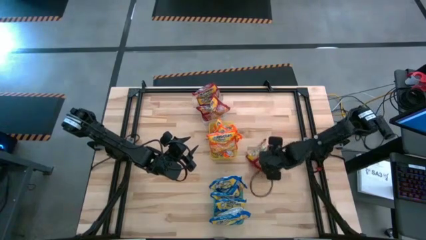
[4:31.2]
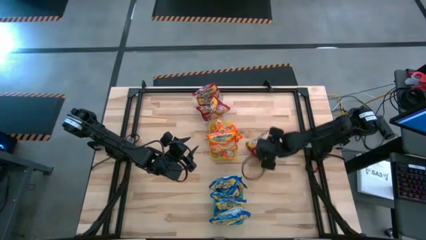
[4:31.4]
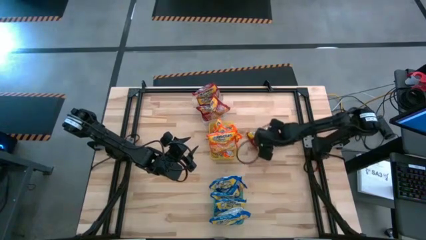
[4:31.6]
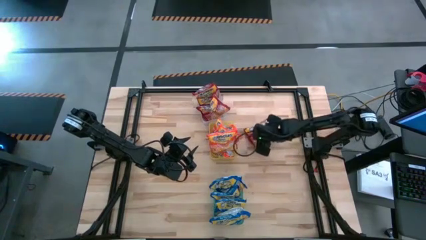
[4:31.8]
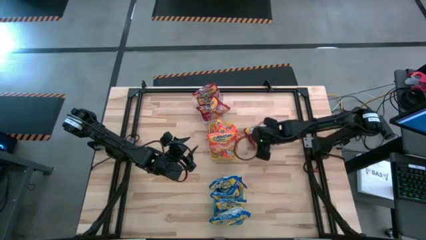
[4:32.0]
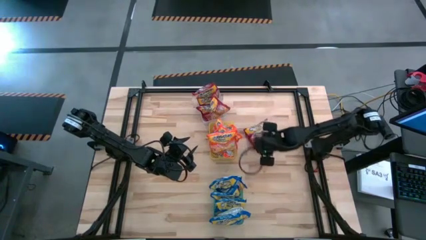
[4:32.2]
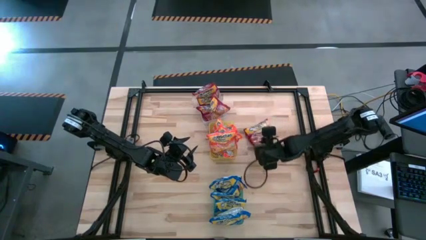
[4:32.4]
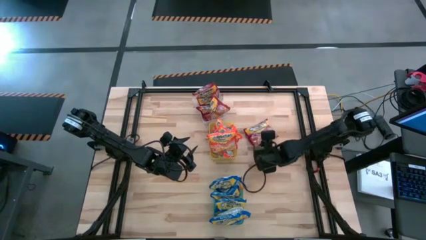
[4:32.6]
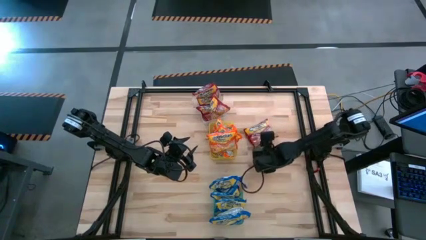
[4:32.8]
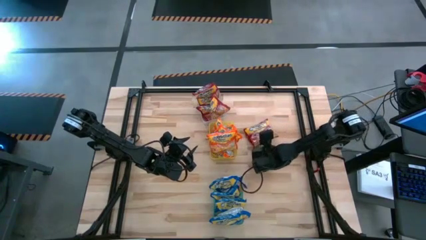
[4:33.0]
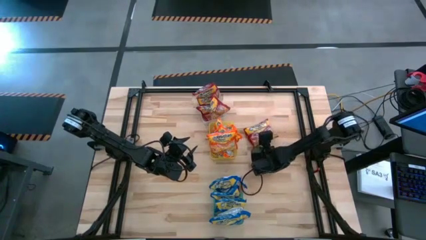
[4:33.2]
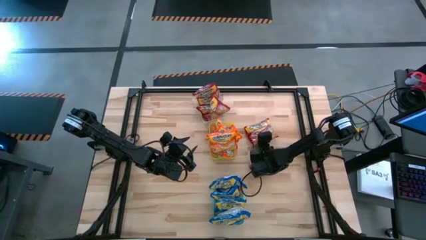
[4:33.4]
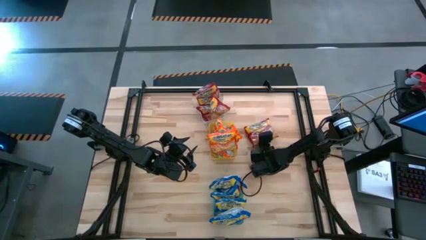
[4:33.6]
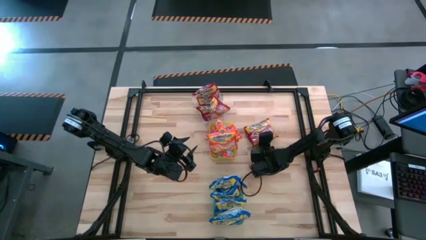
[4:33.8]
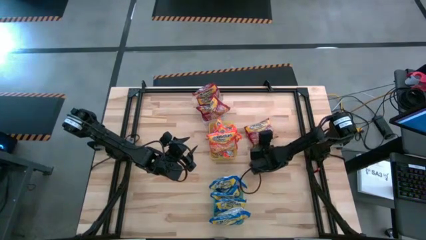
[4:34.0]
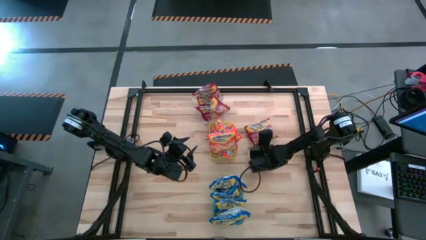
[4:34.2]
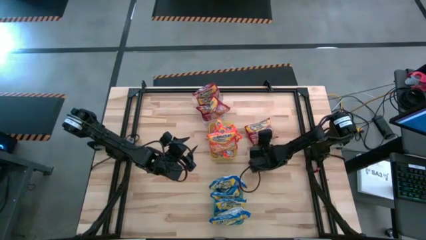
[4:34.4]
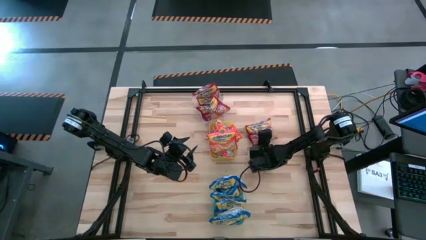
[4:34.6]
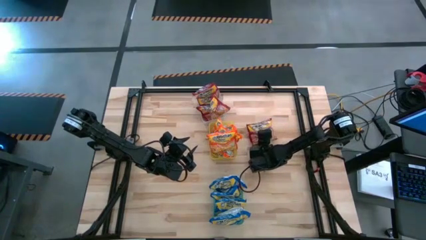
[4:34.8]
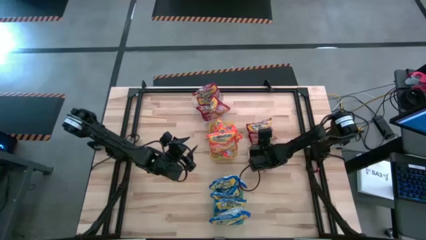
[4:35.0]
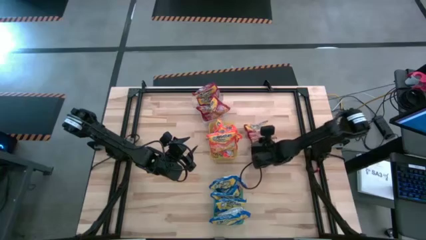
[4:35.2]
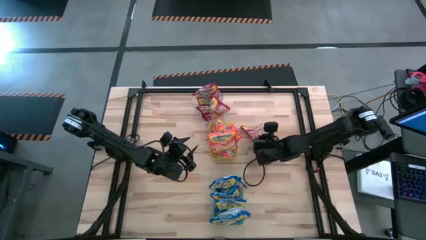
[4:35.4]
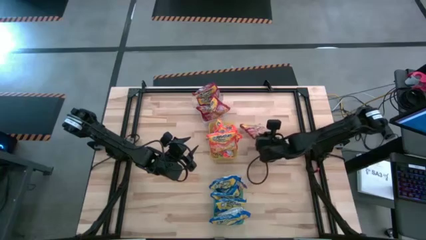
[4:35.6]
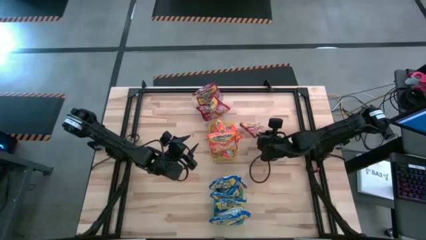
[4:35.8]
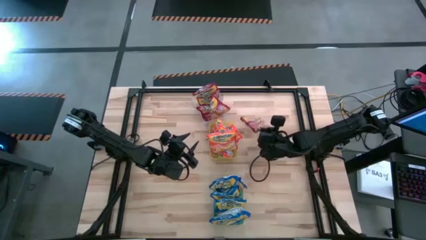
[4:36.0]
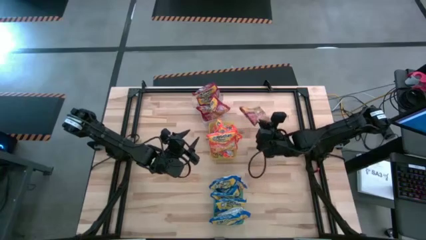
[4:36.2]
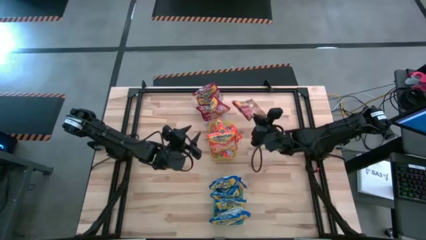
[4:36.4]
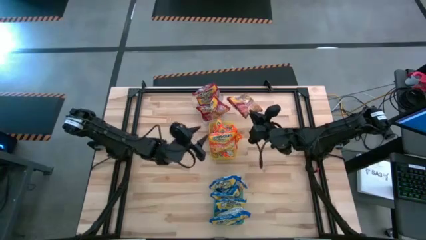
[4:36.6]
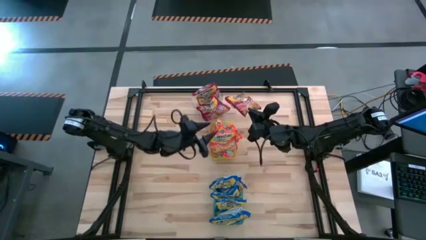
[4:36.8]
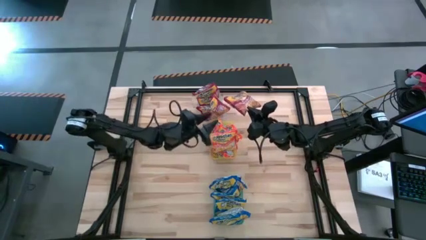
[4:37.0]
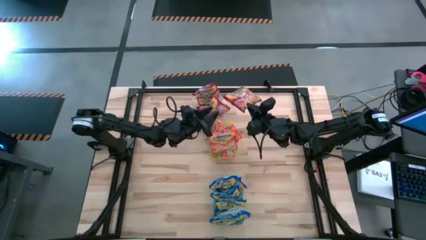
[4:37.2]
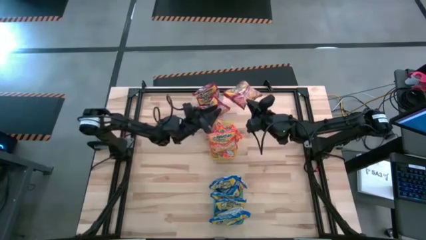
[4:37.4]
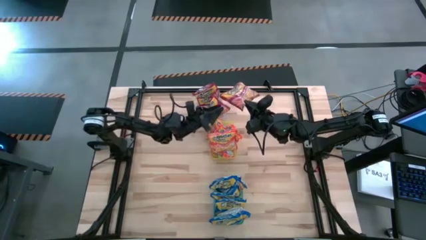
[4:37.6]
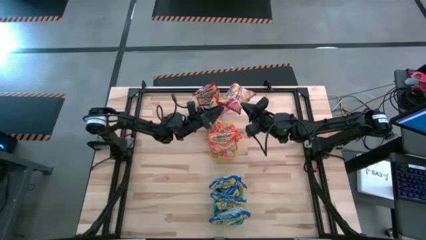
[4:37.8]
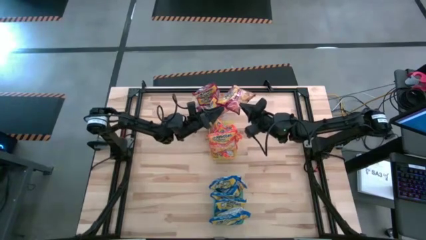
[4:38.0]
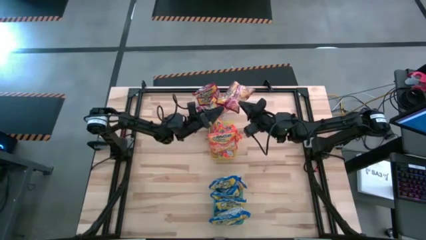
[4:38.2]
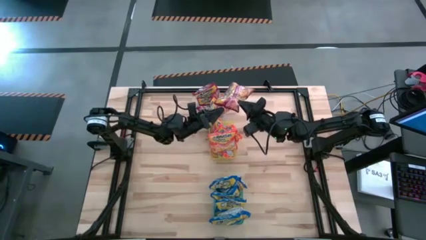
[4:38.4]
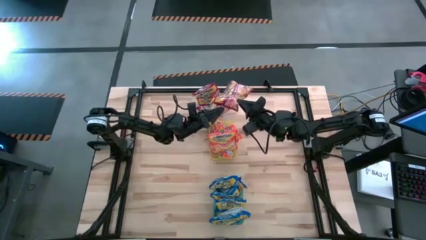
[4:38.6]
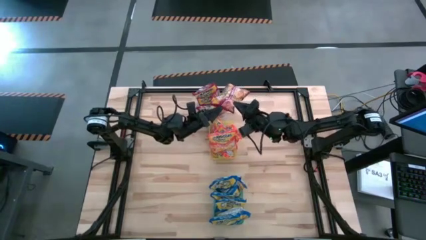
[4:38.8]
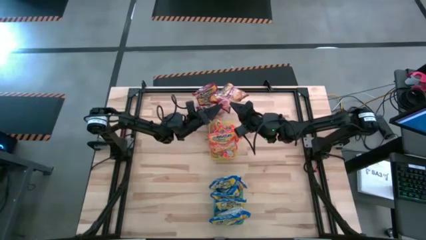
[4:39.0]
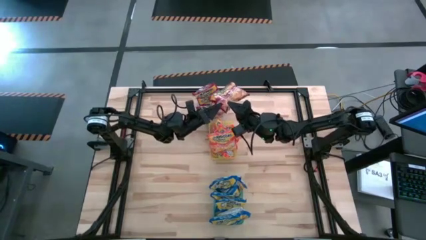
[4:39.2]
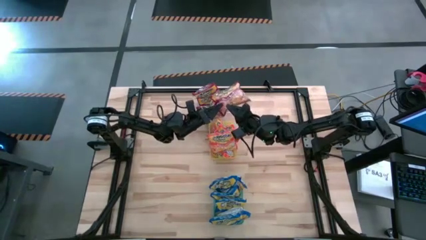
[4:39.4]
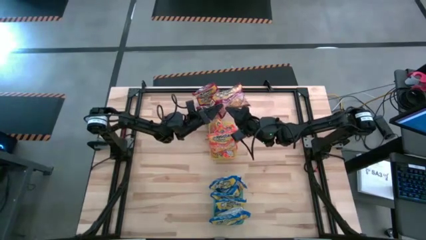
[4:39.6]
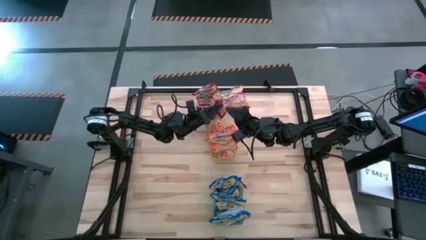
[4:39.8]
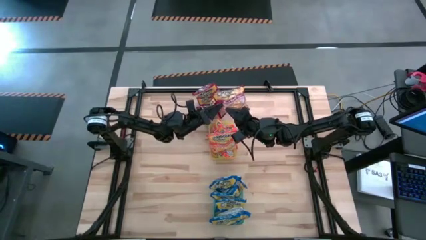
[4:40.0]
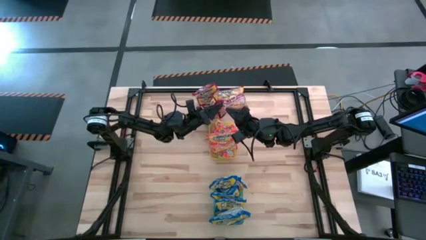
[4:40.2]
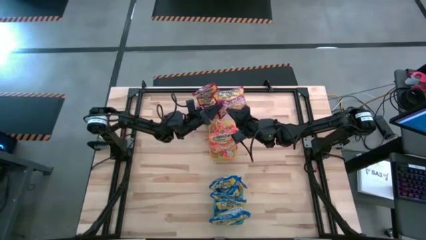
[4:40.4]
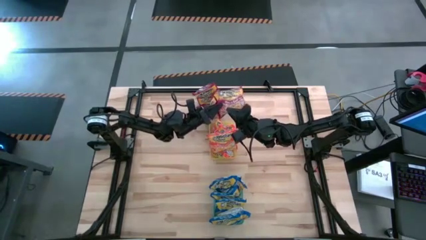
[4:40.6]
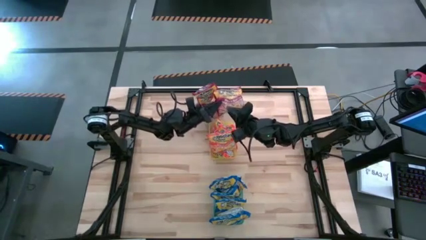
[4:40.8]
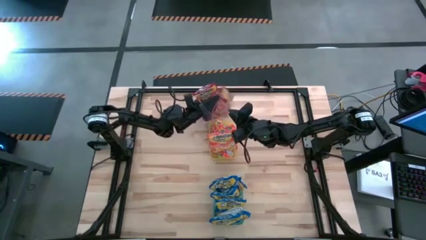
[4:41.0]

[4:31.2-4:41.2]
Task: Sort Maruchan noodles
Put the red noodle pack into the transparent bin

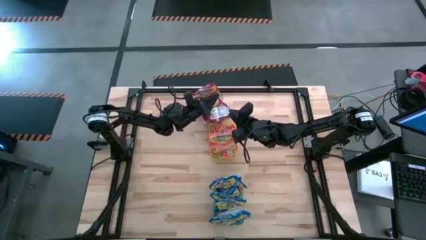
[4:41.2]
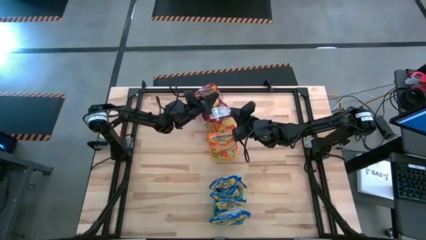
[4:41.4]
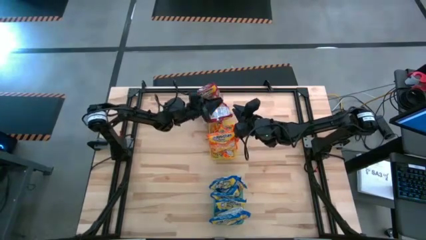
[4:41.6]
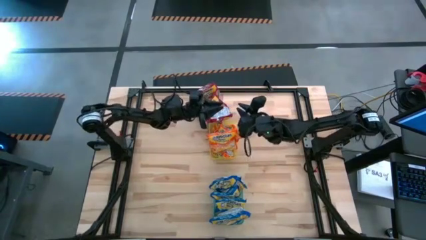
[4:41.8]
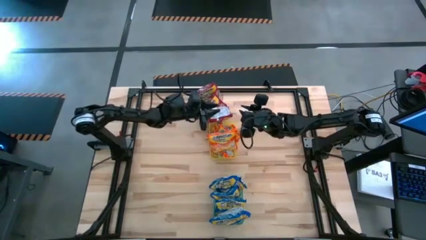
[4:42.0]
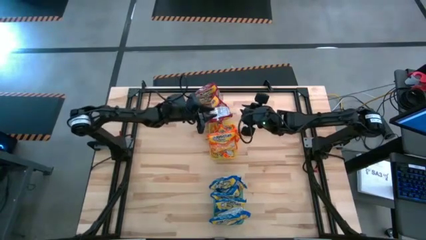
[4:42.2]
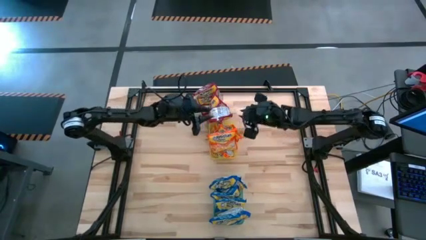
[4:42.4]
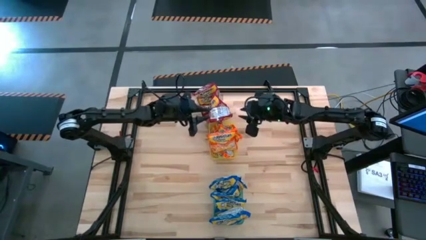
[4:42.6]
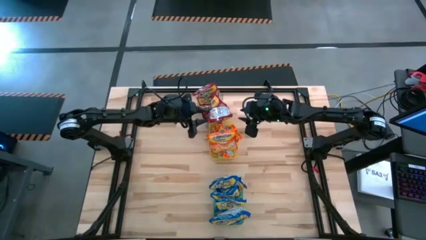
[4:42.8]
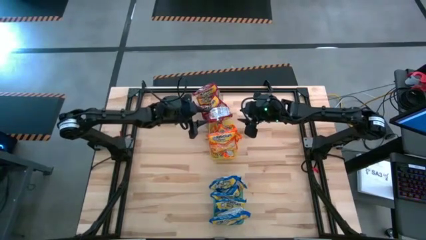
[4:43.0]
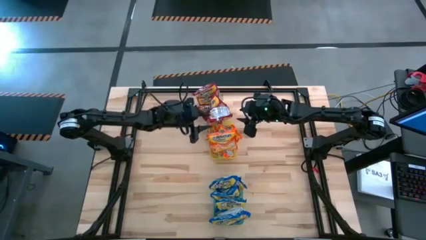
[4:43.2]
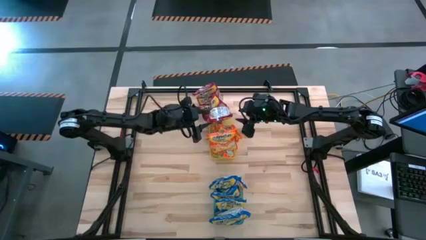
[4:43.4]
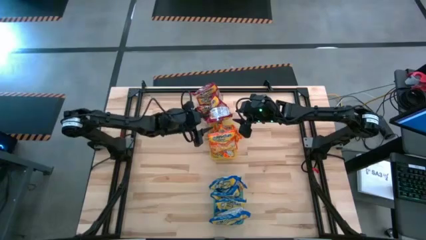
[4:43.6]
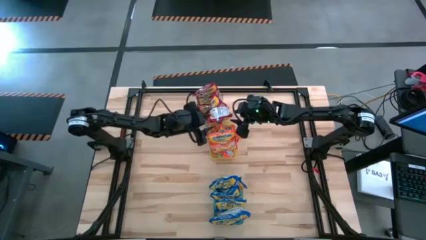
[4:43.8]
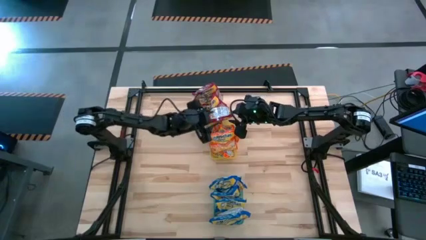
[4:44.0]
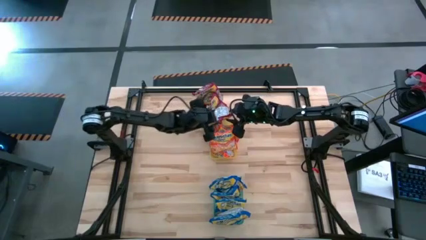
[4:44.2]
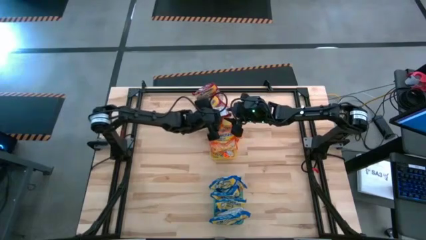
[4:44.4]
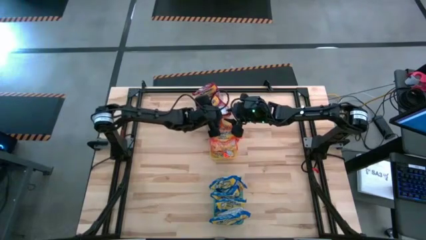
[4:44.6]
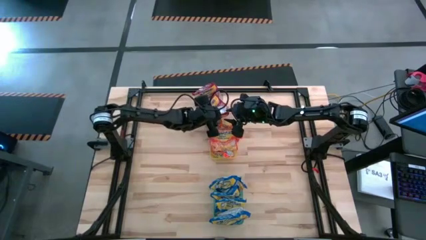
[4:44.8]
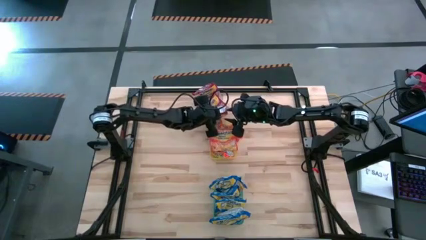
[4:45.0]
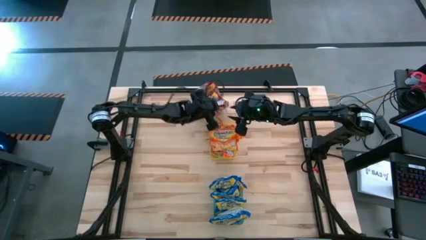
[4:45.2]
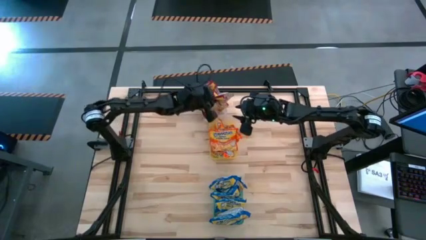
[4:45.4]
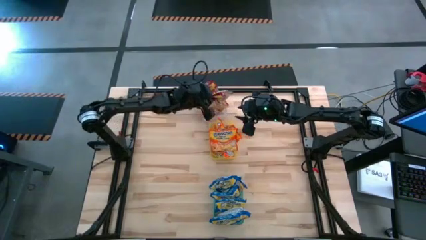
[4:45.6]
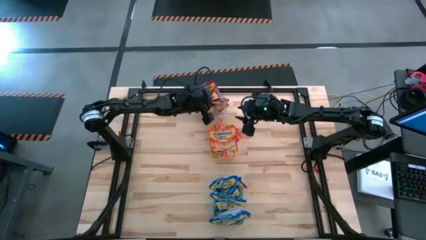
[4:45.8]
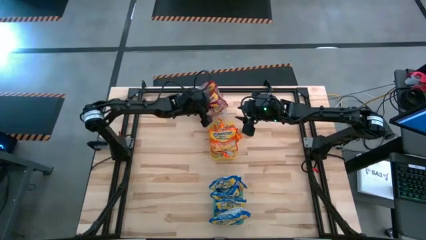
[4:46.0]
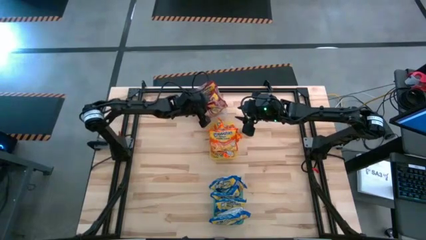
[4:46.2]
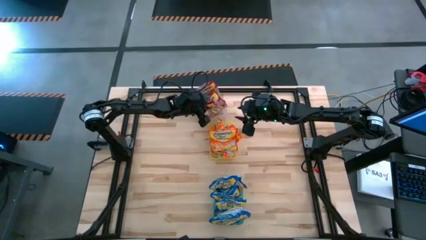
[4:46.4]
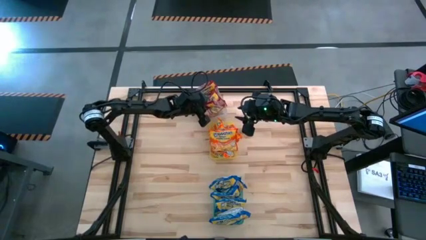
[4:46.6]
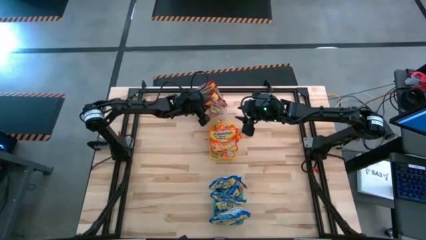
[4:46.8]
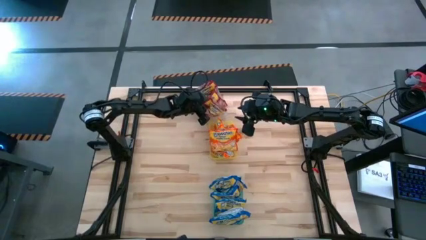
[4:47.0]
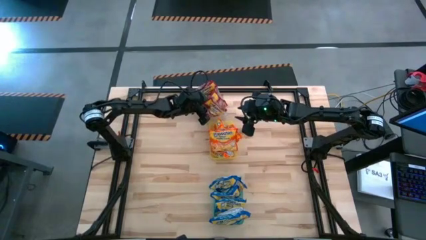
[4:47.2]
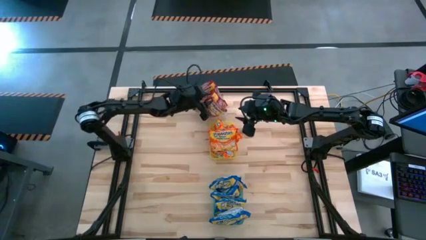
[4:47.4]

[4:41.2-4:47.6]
Put the red noodle pack into the transparent bin
